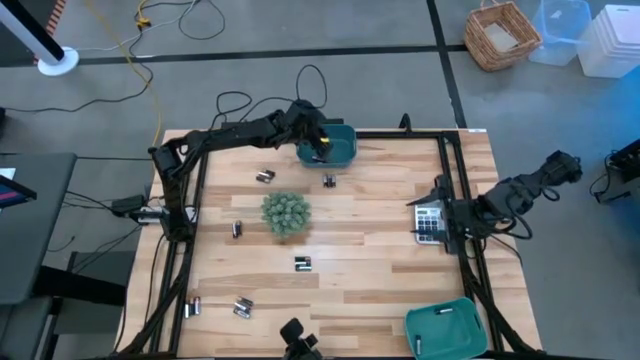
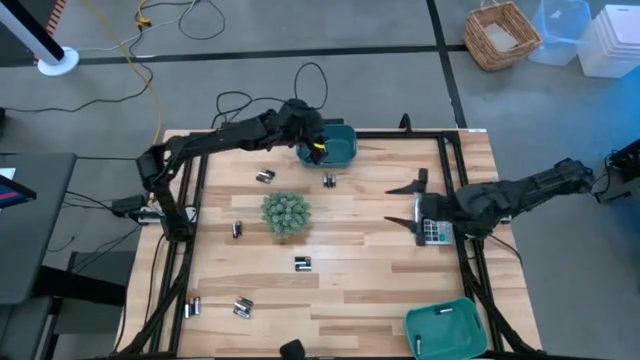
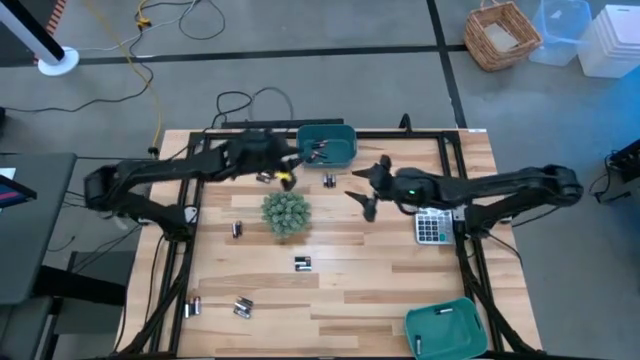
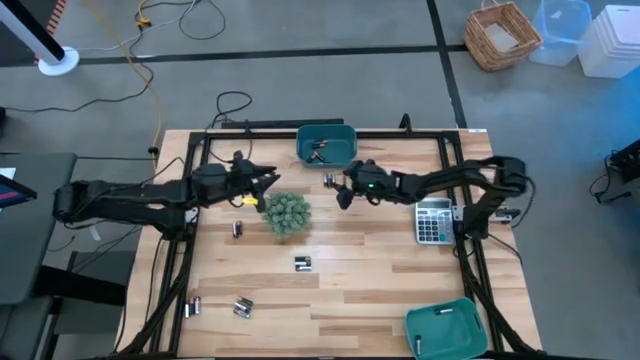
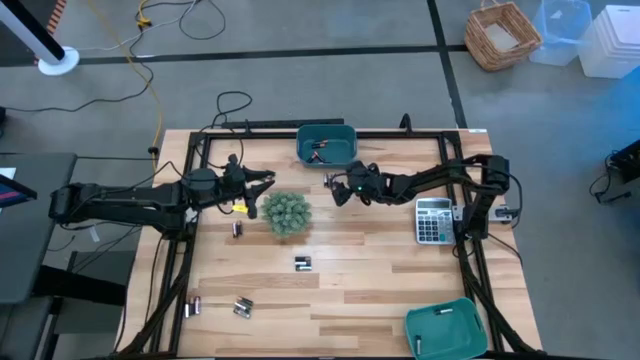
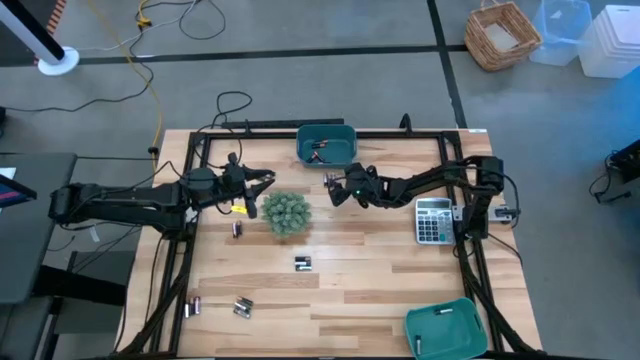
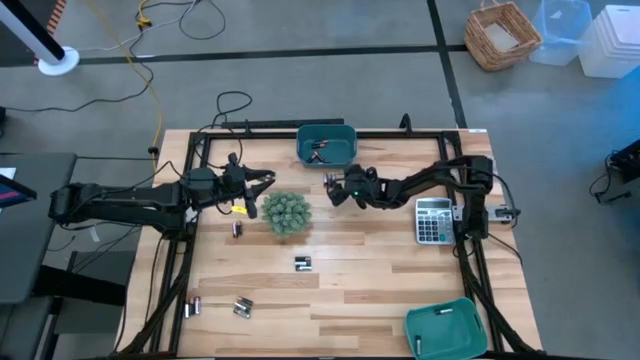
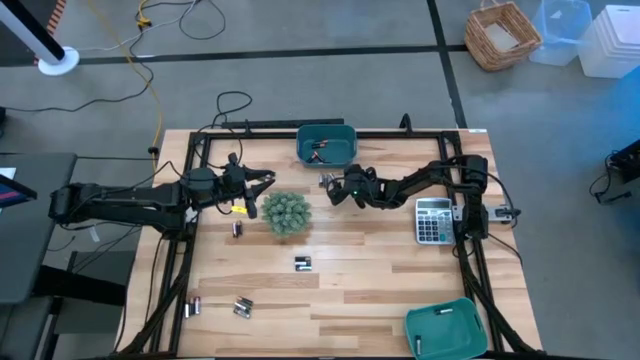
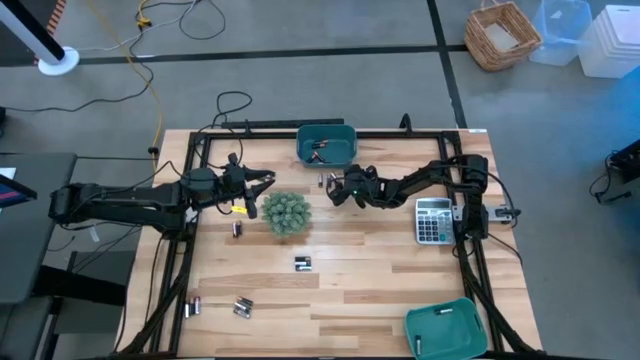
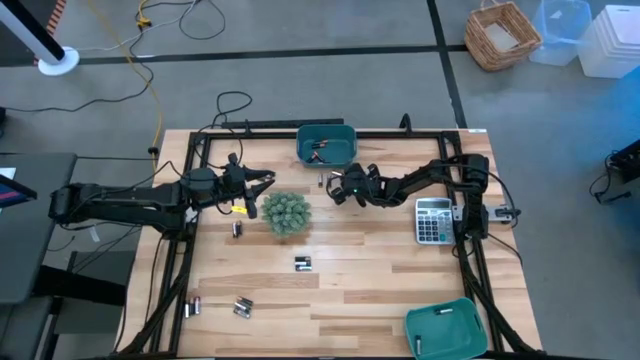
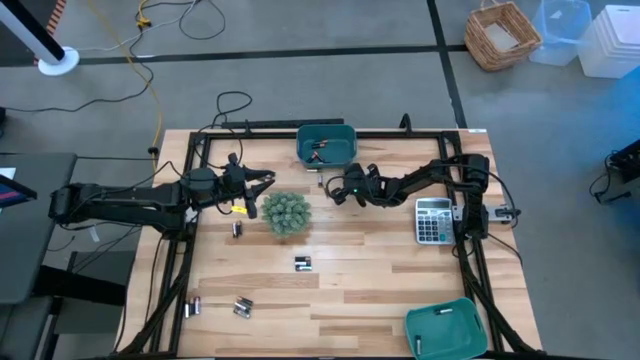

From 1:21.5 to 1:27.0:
Task: Sort batteries
Put the silver battery into the green bin

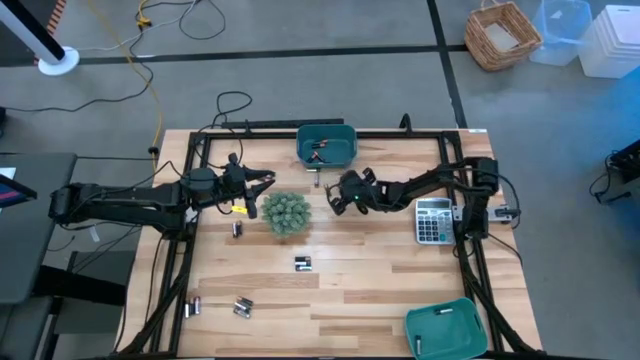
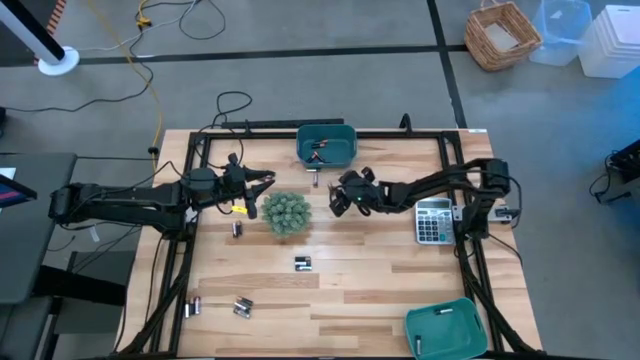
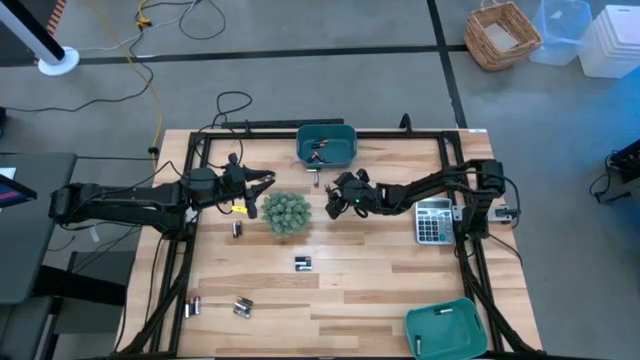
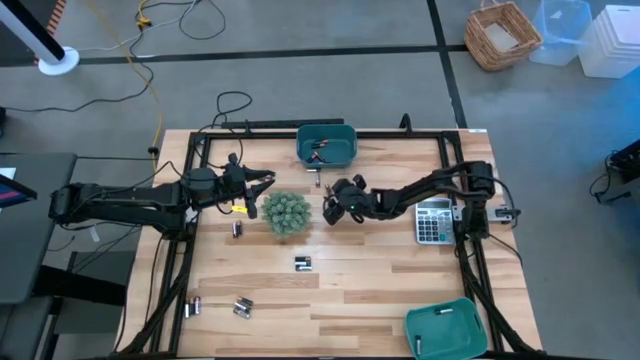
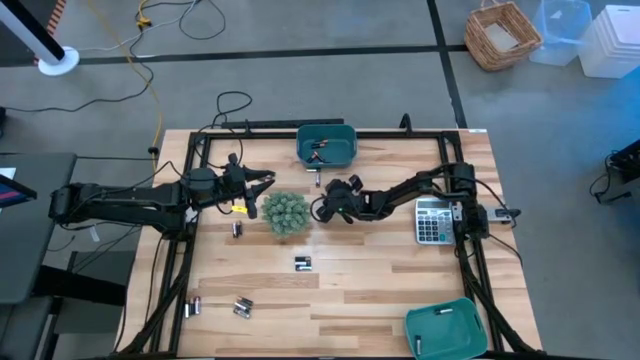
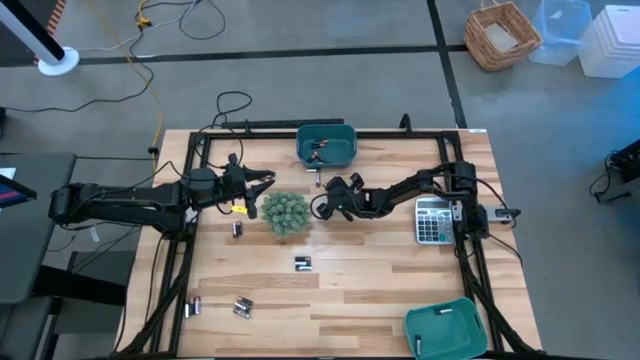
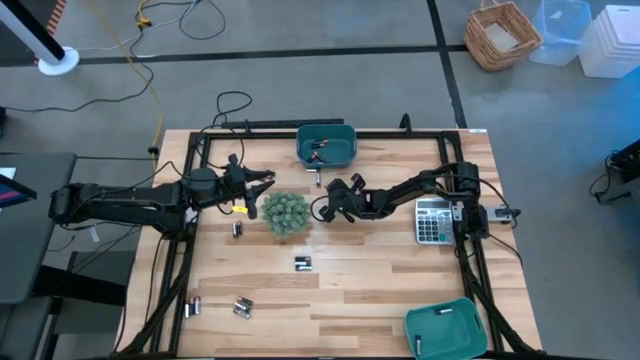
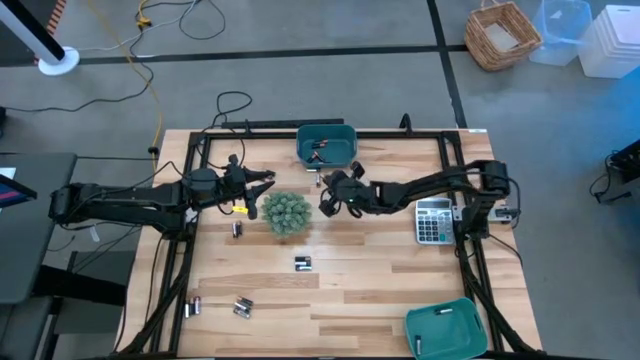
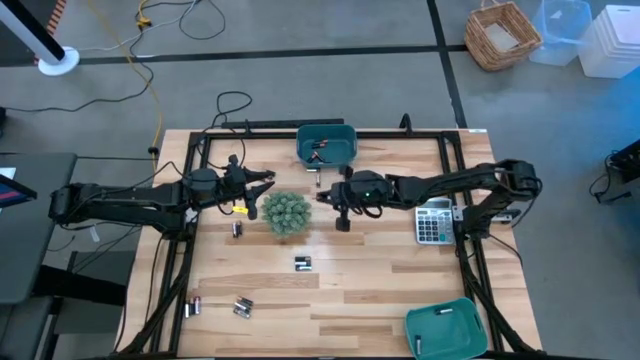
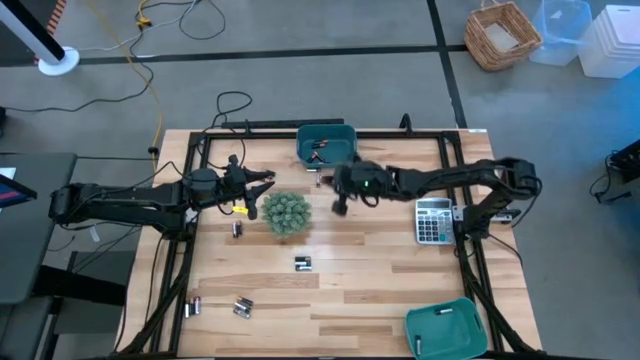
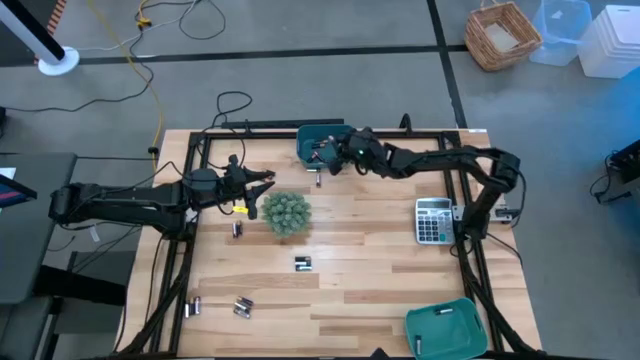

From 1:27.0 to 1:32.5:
Put the black battery into the blue bin

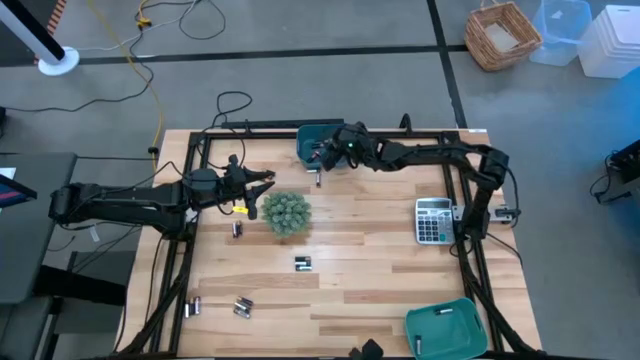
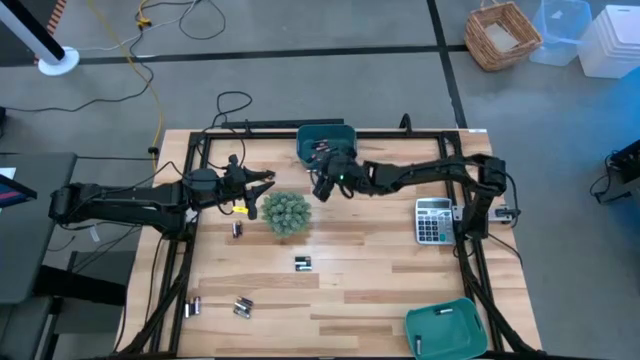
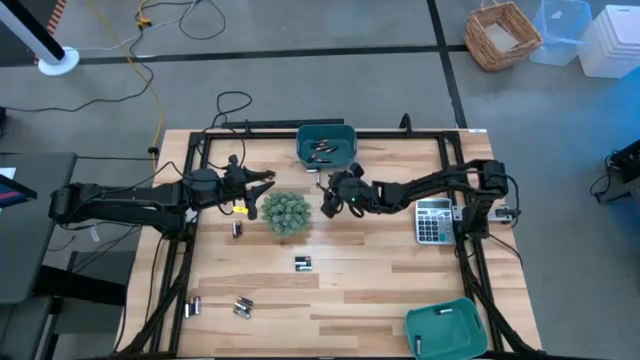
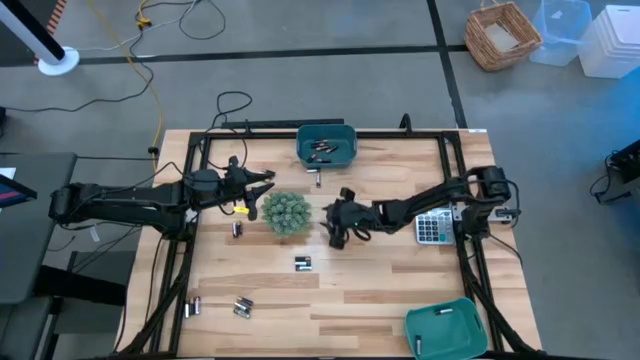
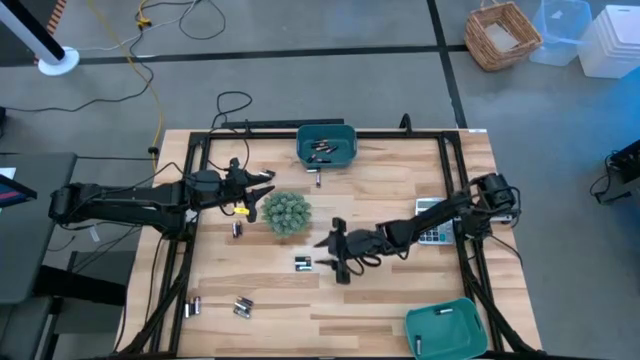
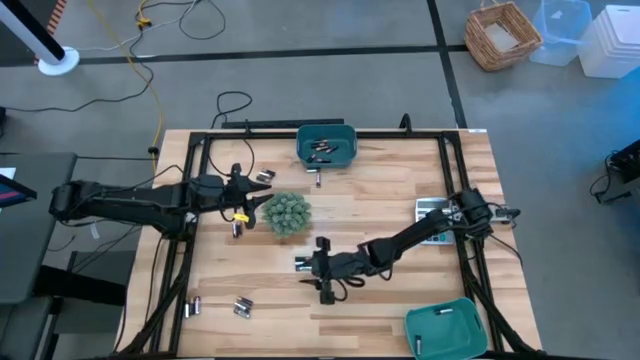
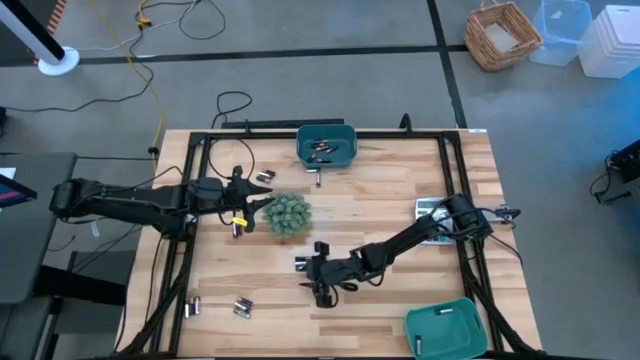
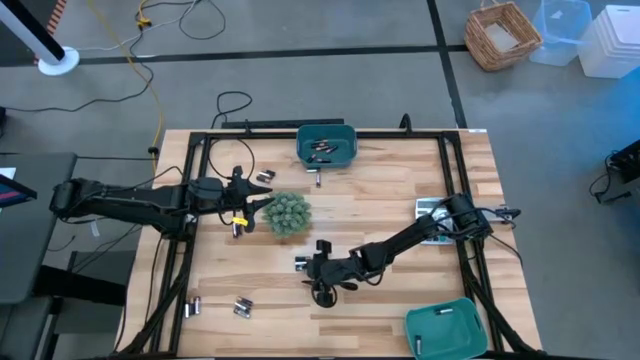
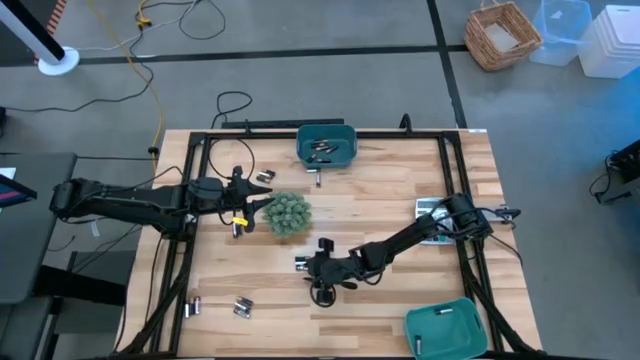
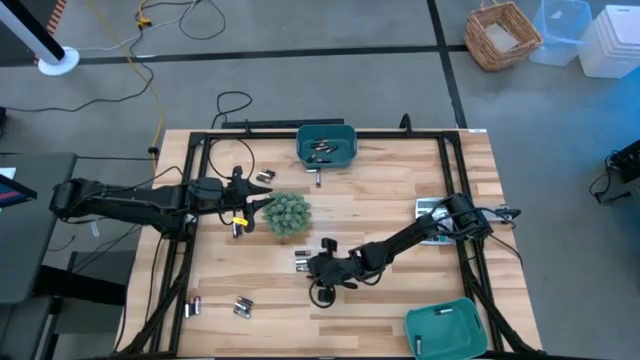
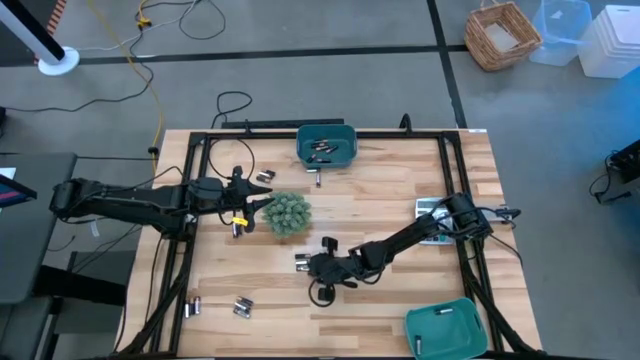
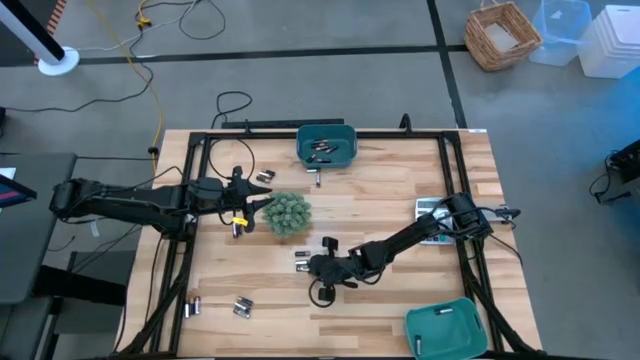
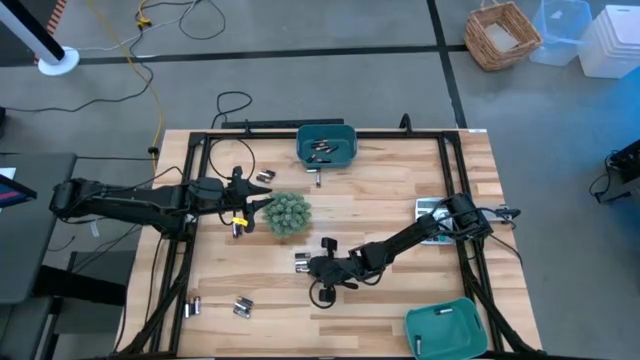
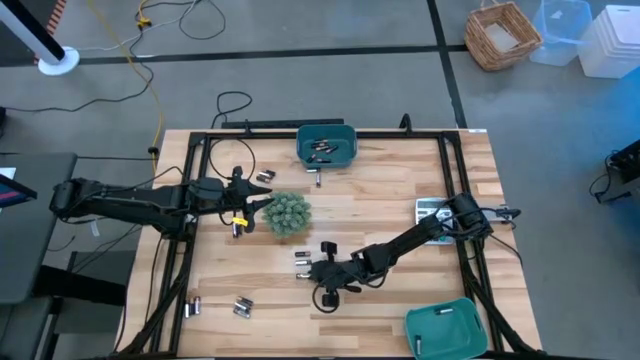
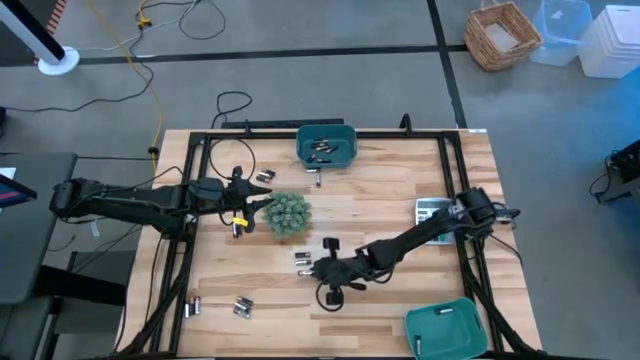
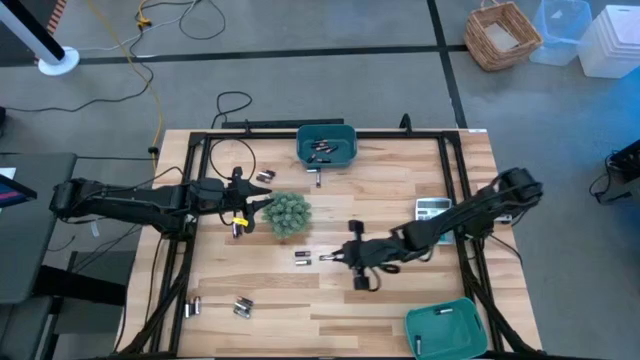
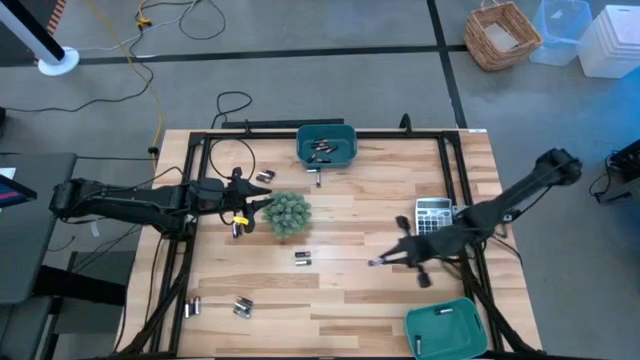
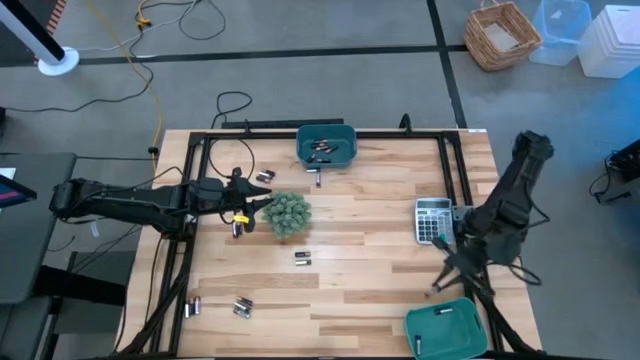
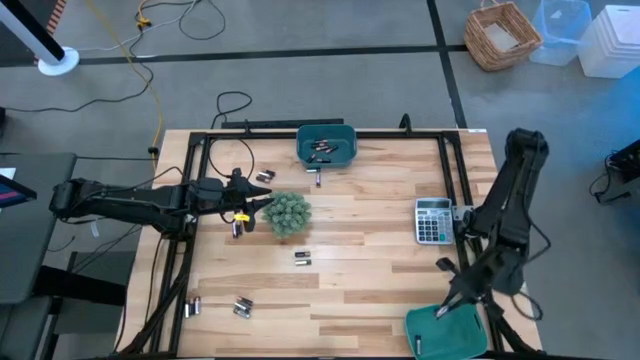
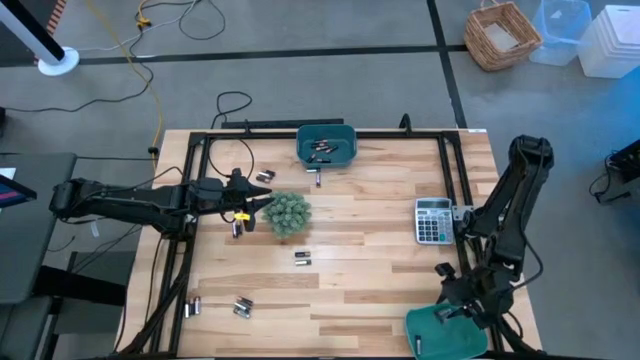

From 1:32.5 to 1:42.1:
Put the silver battery into the green bin
